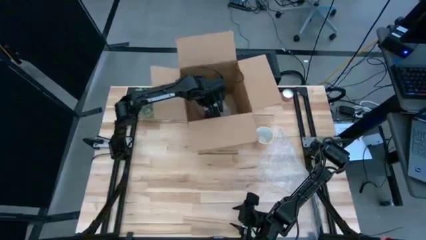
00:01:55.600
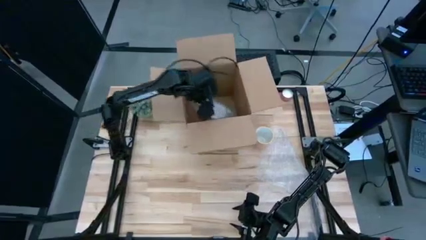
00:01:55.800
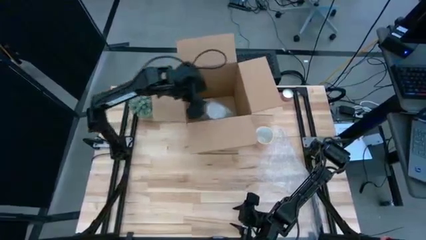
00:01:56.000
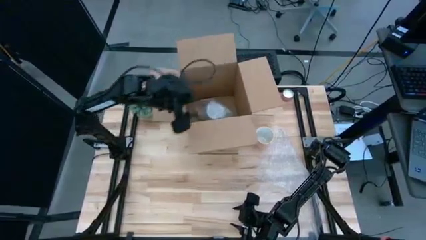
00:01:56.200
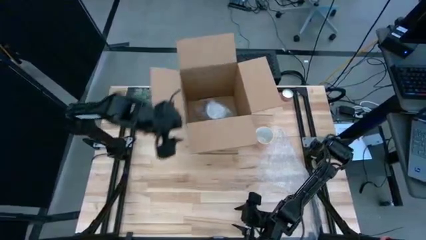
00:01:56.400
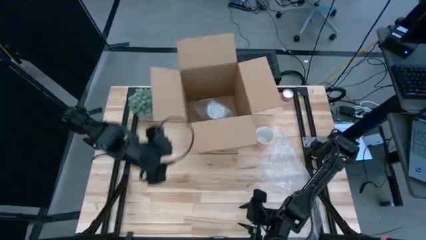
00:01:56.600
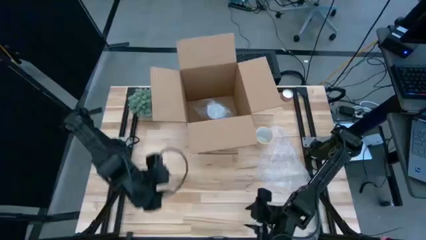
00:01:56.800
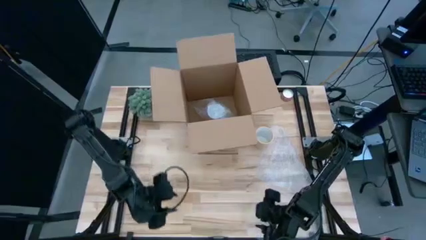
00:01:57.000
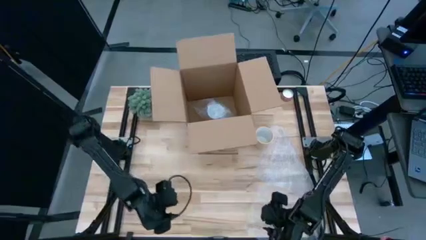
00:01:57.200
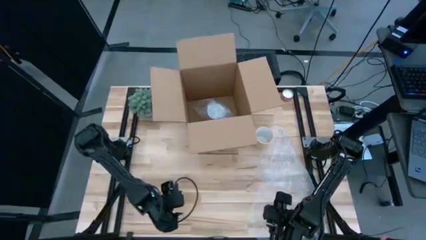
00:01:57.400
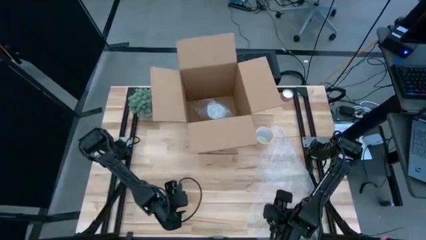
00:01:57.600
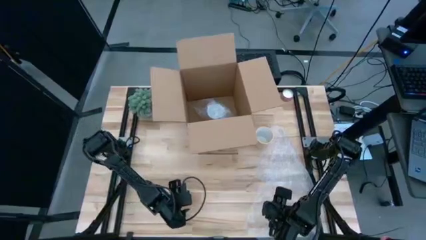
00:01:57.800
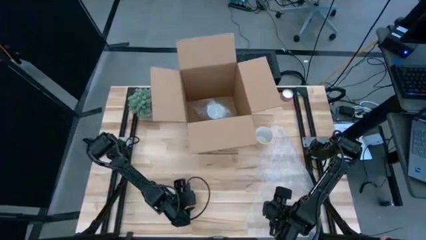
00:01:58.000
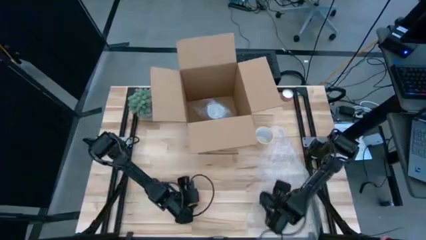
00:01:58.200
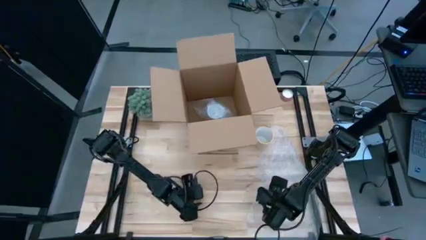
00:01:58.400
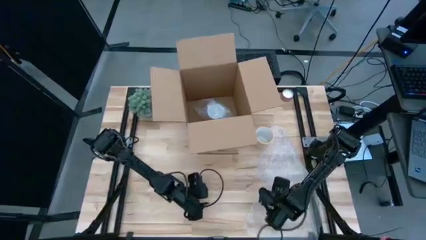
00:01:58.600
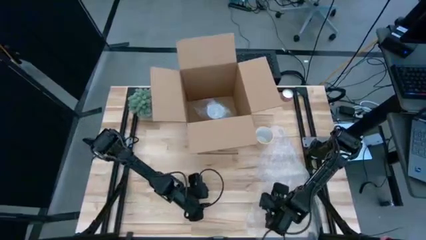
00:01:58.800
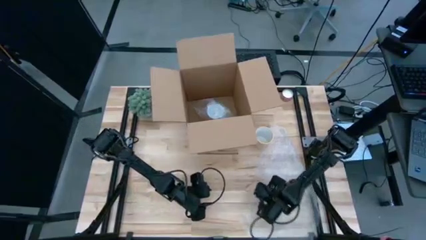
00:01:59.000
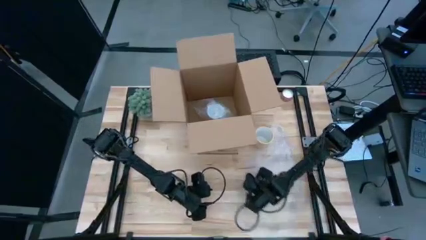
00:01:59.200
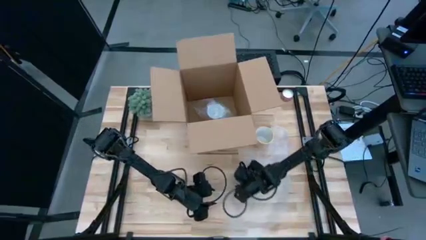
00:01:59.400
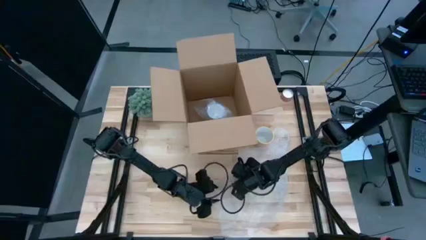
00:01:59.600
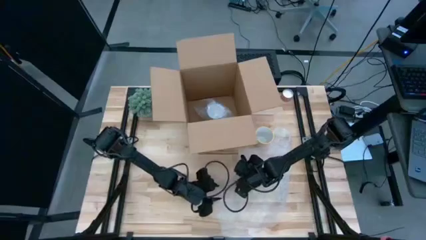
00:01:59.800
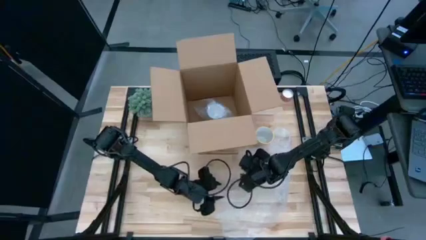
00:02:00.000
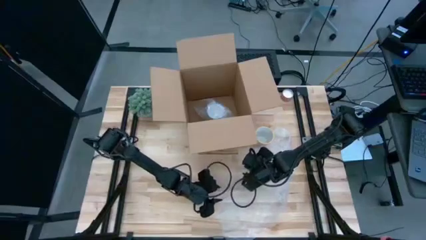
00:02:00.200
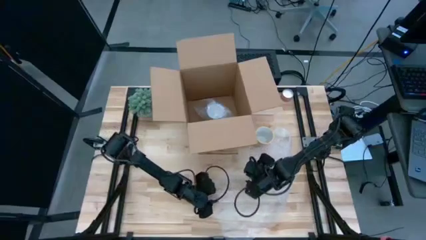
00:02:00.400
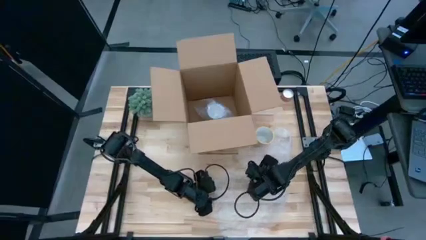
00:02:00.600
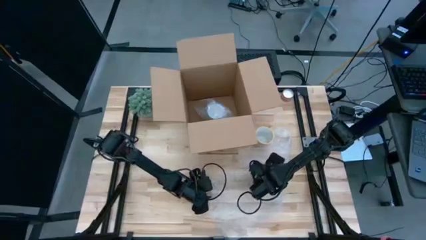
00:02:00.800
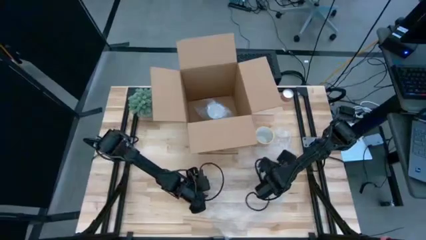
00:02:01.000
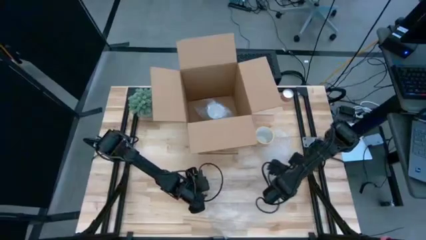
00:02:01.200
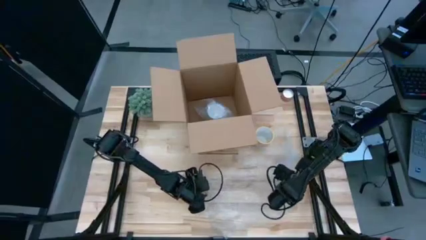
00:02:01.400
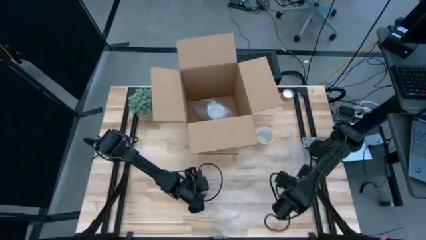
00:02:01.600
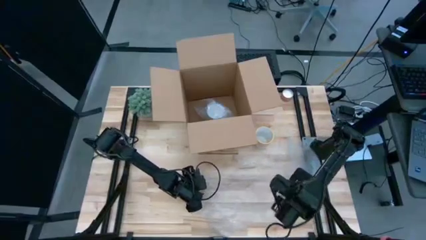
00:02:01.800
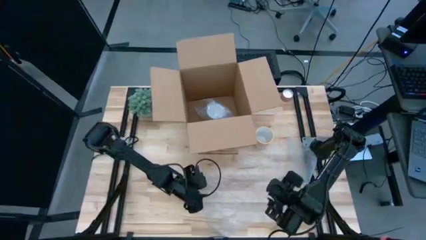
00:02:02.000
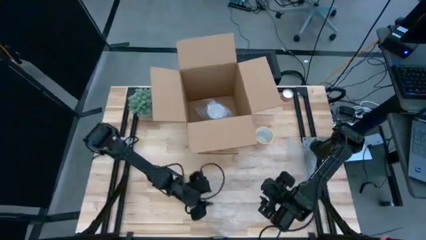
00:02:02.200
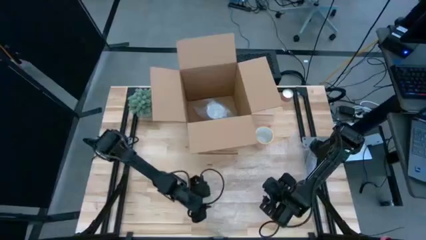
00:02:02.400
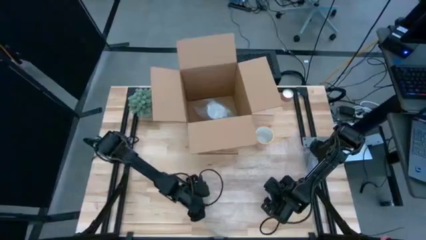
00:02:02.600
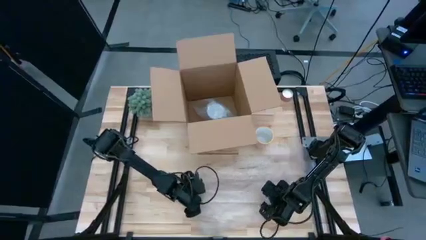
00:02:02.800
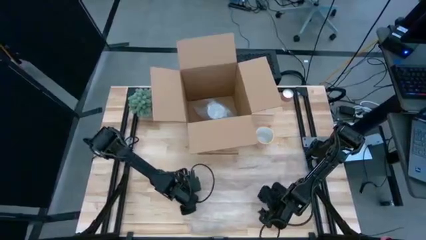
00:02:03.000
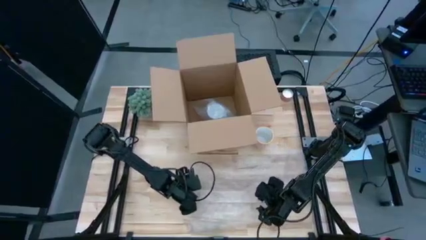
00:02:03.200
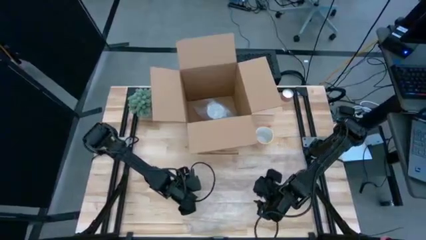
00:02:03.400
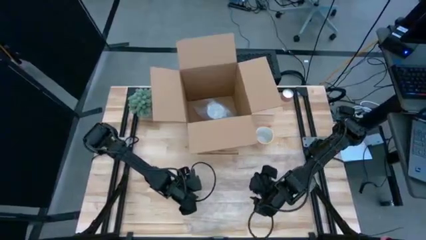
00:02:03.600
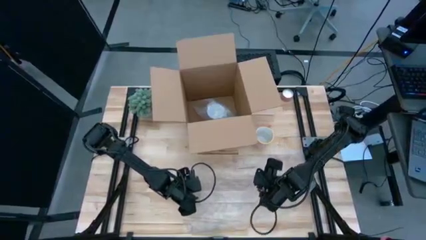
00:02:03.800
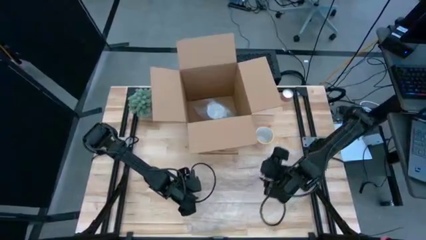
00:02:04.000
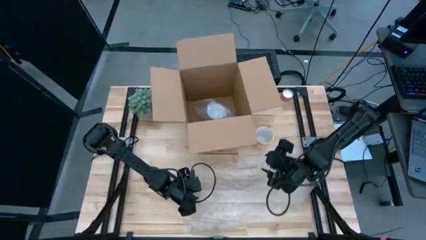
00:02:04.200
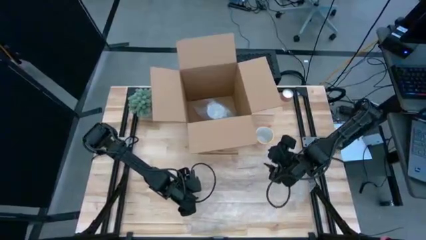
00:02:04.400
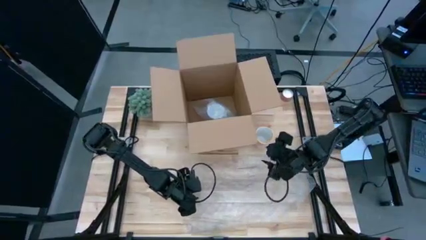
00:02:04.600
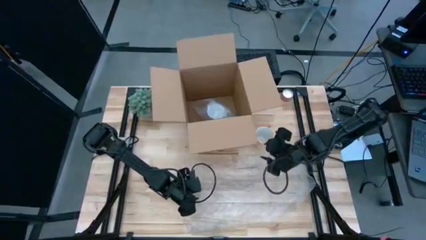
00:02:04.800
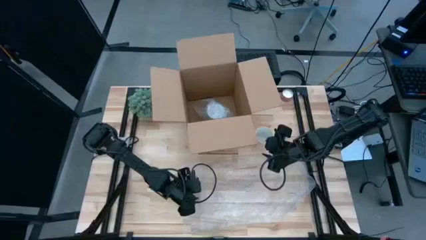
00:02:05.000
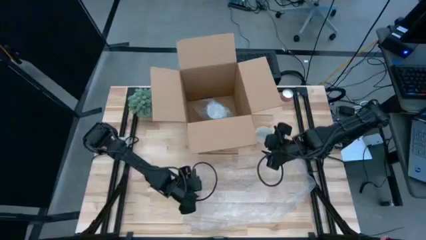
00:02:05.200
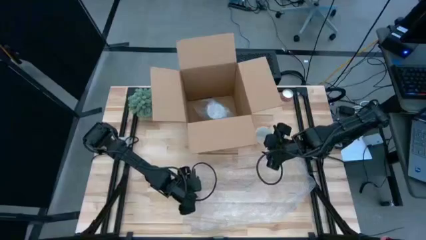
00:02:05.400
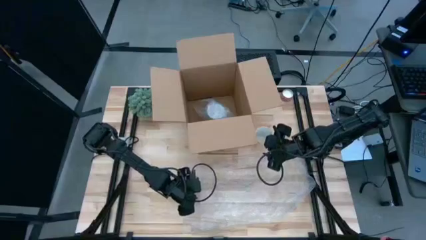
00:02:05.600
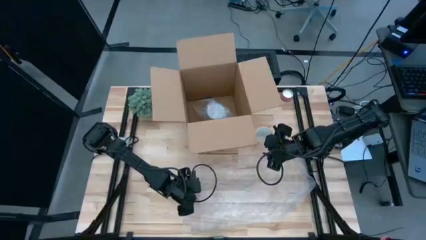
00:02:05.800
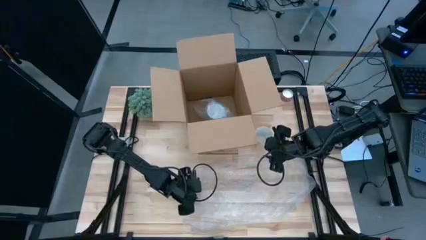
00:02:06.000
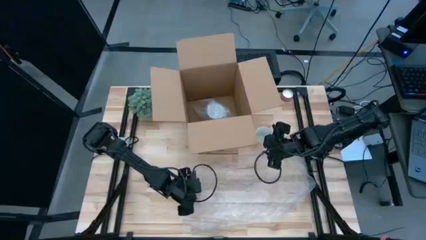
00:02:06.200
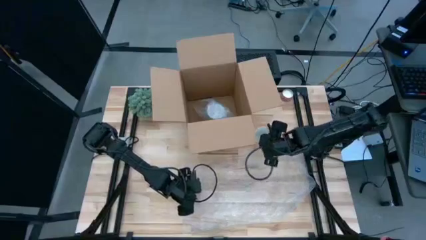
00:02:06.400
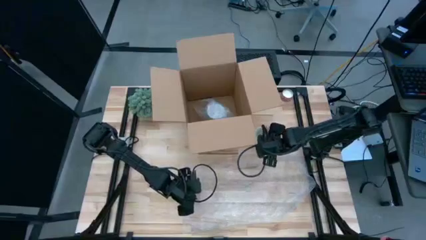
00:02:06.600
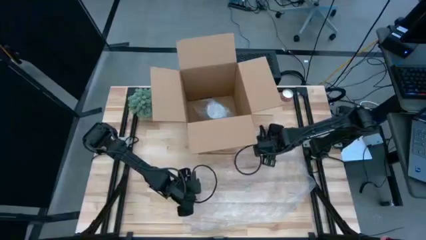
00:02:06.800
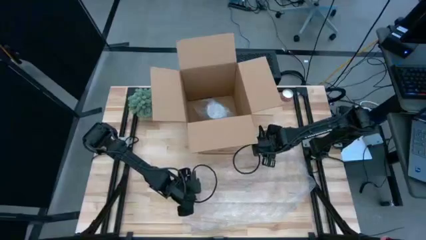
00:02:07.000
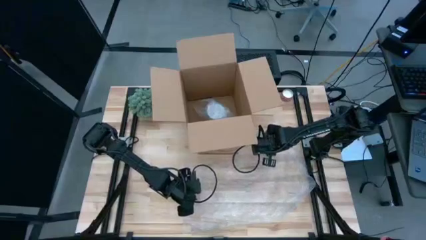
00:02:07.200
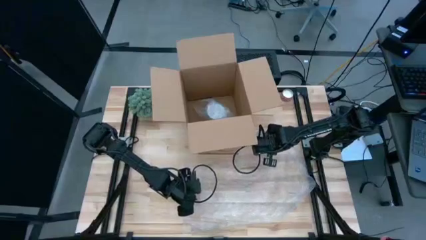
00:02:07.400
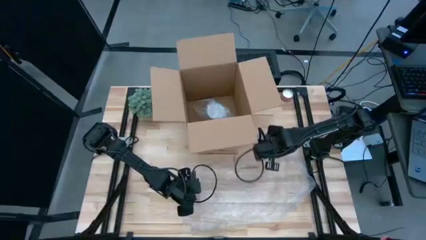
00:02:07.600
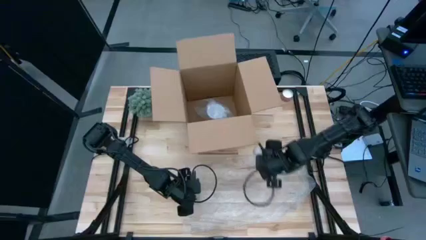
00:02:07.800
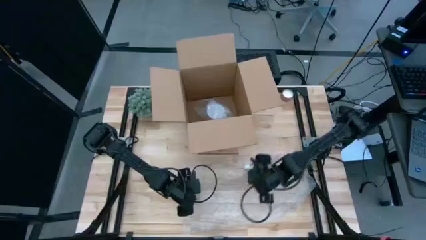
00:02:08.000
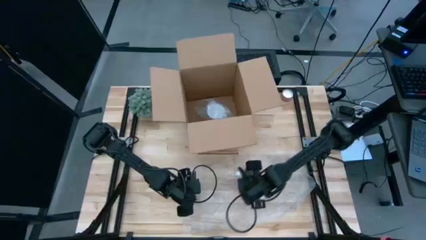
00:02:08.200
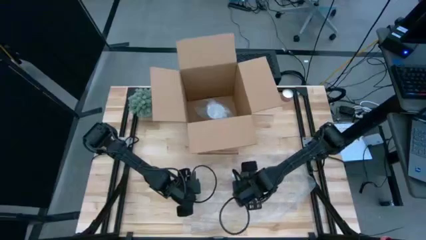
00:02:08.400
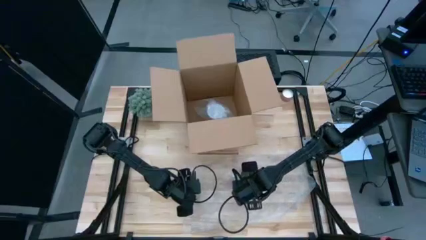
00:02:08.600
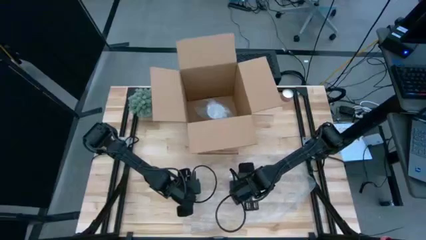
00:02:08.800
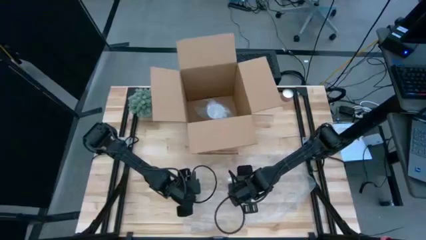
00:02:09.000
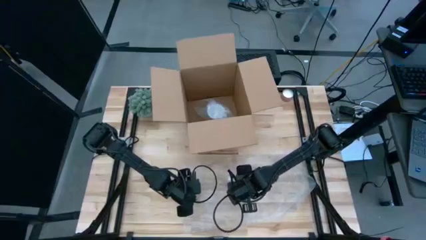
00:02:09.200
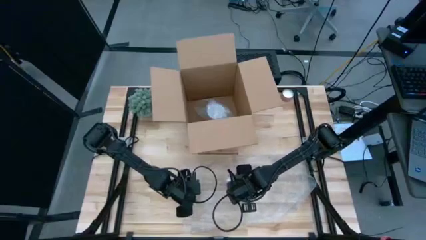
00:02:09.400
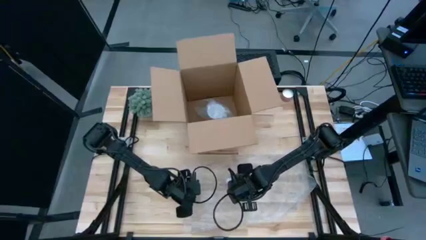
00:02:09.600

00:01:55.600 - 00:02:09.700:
Task: wrap mug
Wrap the orange mug in the bubble wrap
